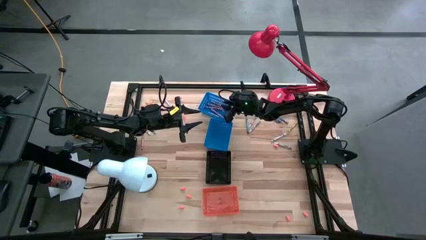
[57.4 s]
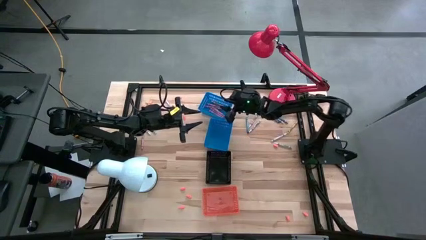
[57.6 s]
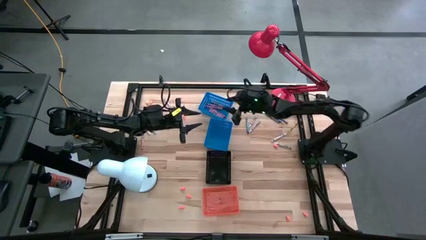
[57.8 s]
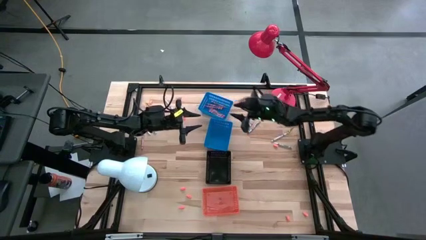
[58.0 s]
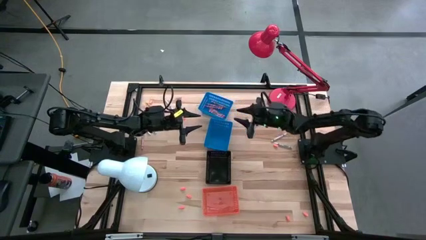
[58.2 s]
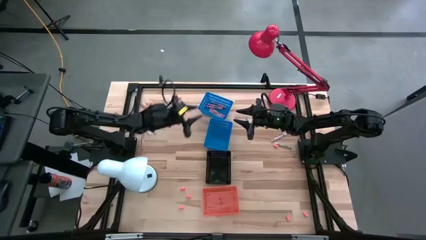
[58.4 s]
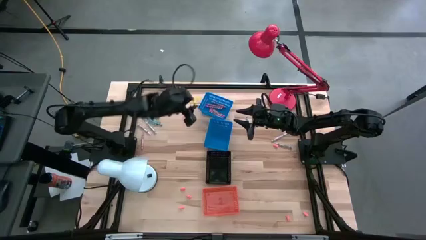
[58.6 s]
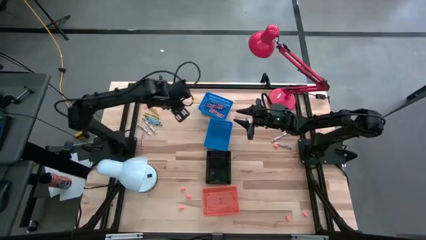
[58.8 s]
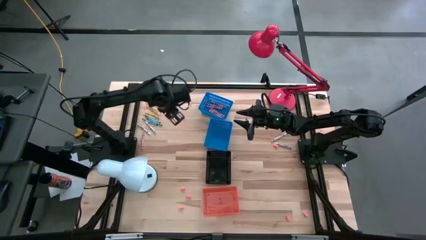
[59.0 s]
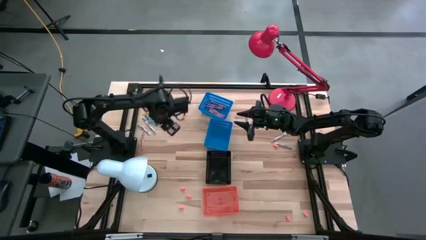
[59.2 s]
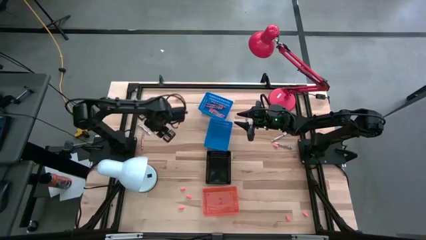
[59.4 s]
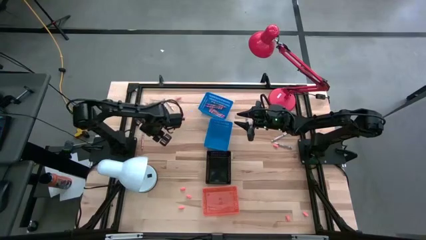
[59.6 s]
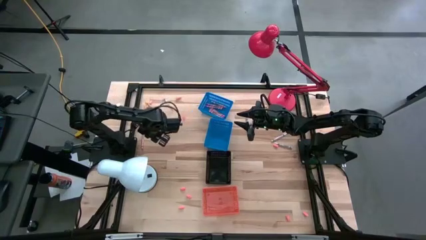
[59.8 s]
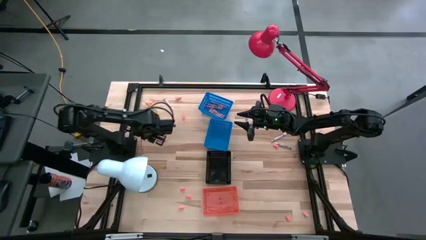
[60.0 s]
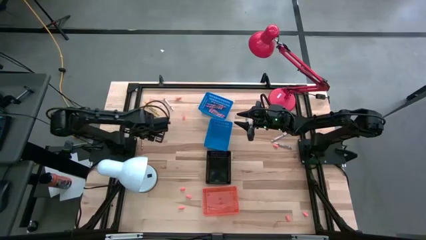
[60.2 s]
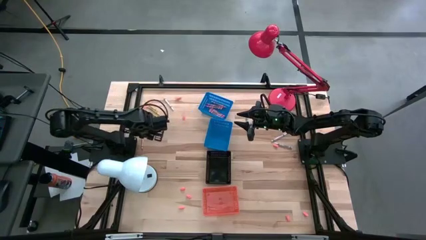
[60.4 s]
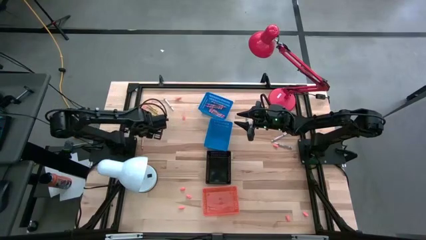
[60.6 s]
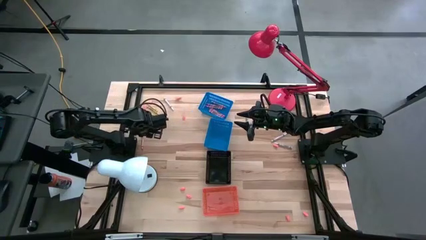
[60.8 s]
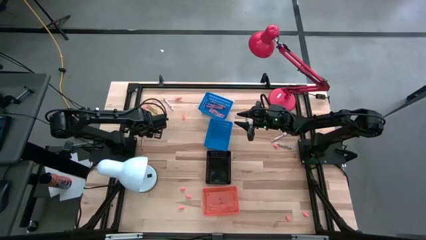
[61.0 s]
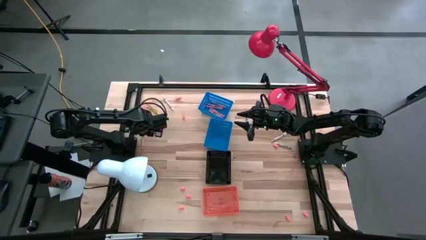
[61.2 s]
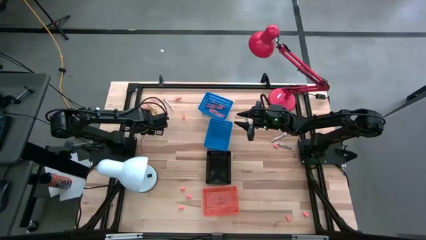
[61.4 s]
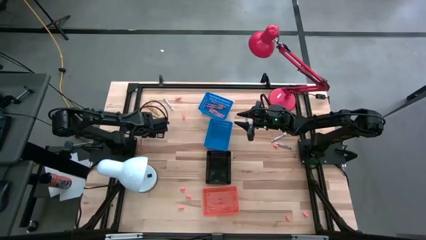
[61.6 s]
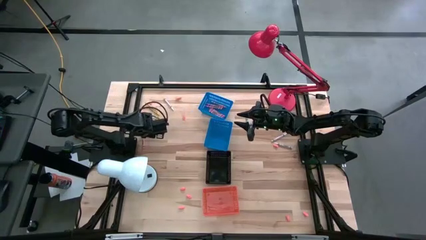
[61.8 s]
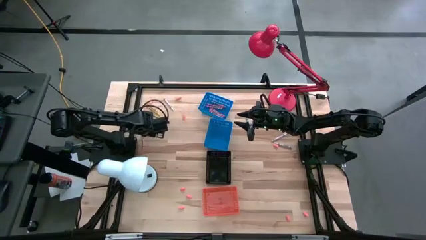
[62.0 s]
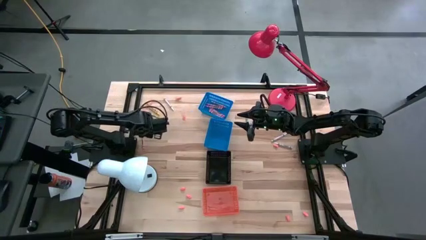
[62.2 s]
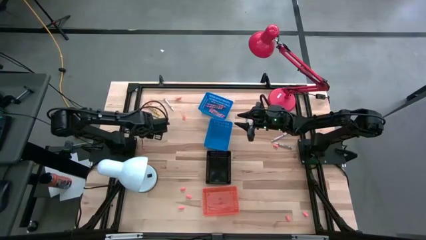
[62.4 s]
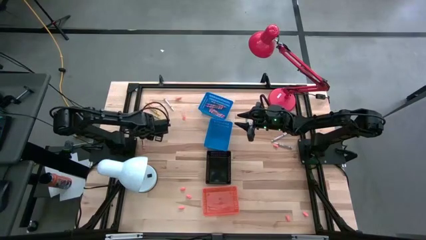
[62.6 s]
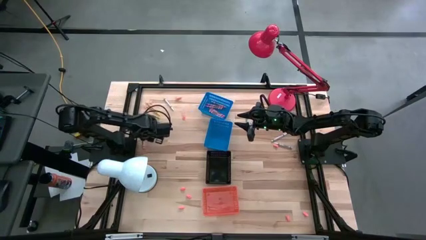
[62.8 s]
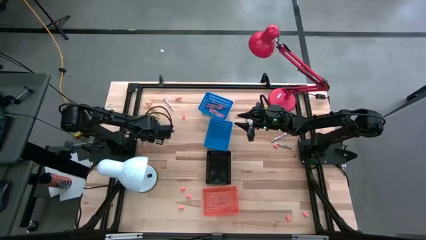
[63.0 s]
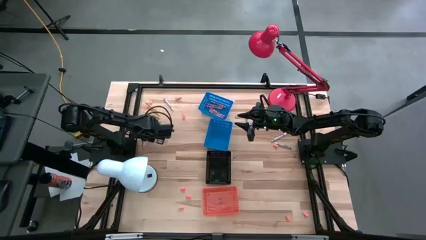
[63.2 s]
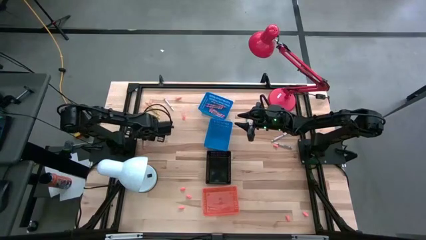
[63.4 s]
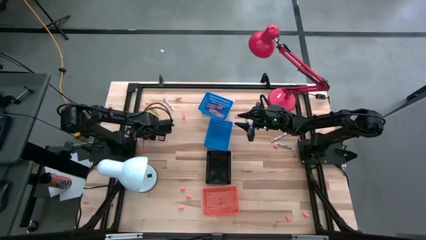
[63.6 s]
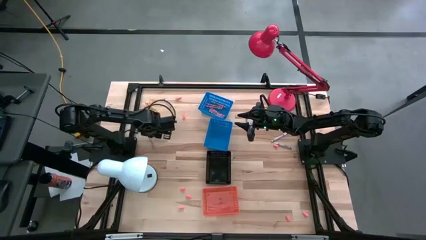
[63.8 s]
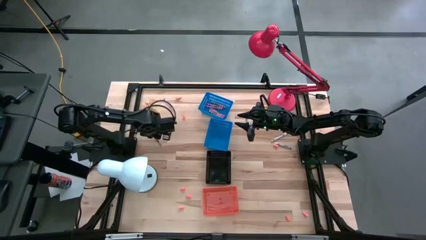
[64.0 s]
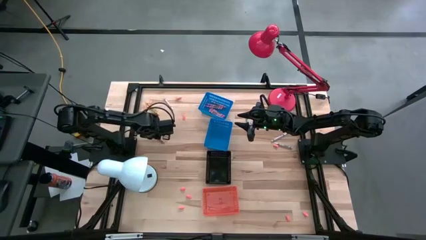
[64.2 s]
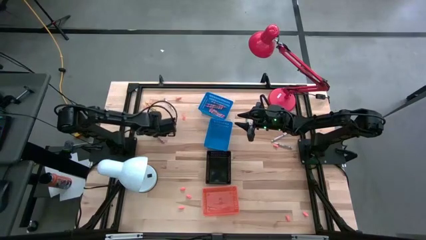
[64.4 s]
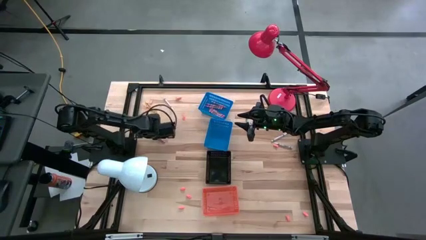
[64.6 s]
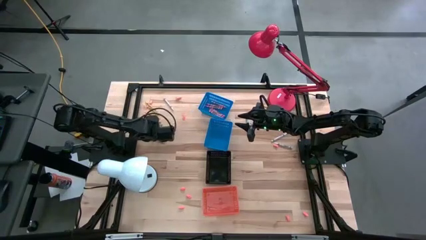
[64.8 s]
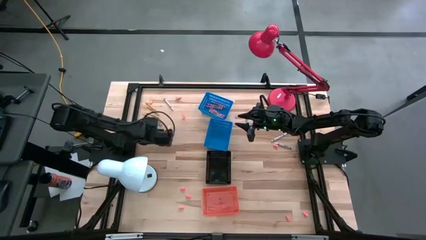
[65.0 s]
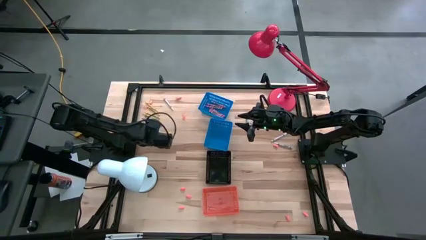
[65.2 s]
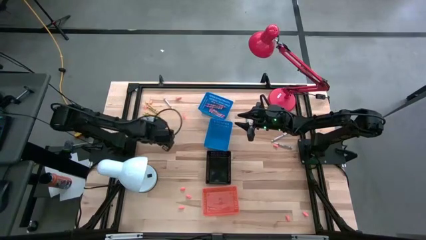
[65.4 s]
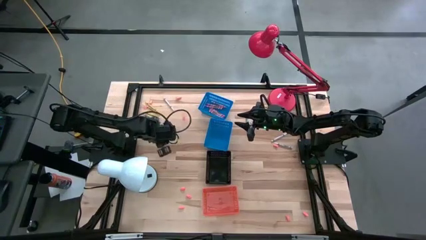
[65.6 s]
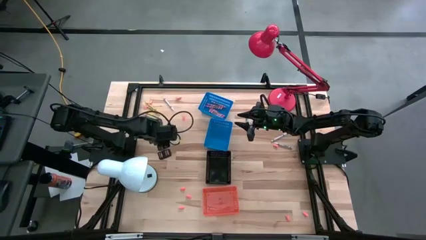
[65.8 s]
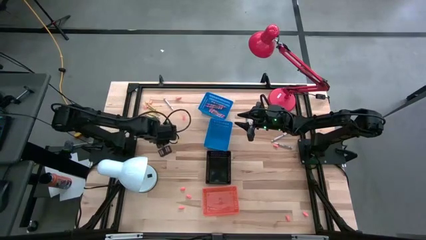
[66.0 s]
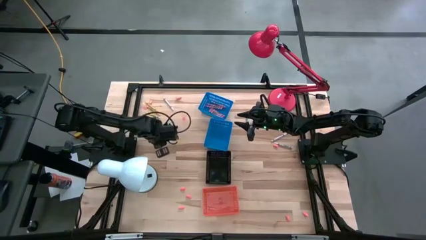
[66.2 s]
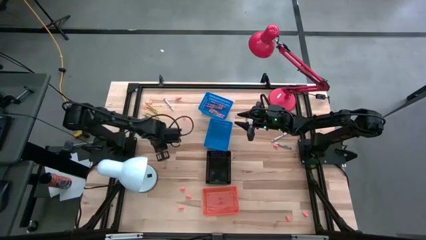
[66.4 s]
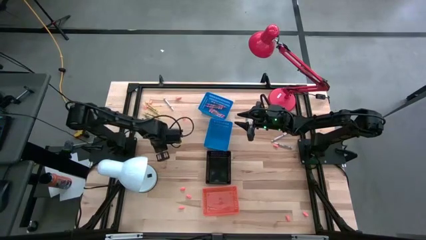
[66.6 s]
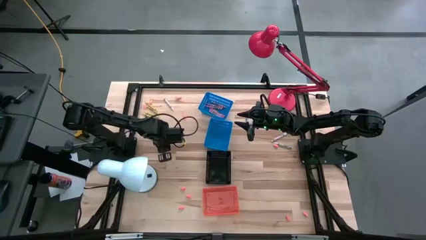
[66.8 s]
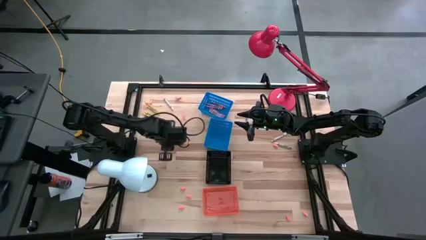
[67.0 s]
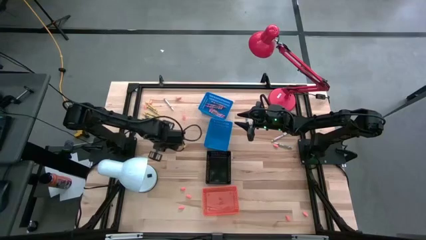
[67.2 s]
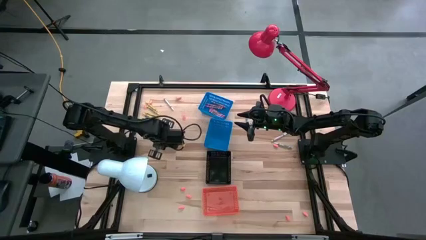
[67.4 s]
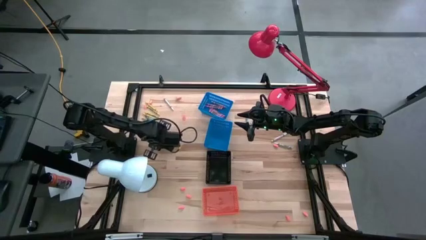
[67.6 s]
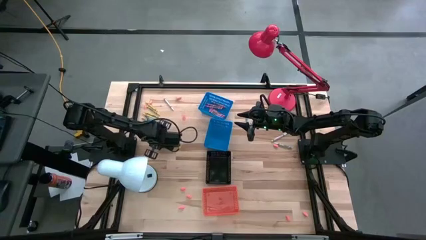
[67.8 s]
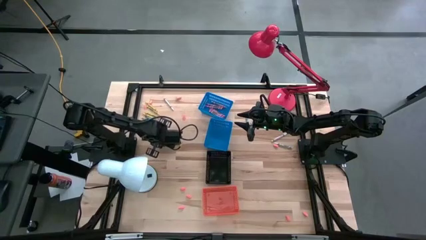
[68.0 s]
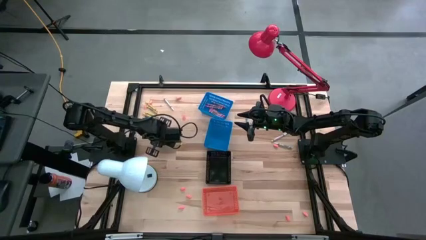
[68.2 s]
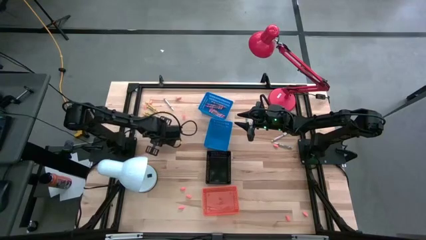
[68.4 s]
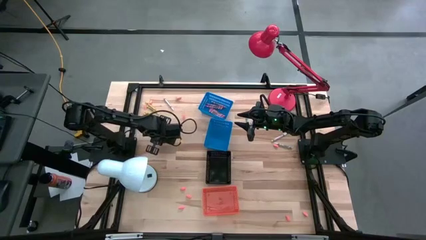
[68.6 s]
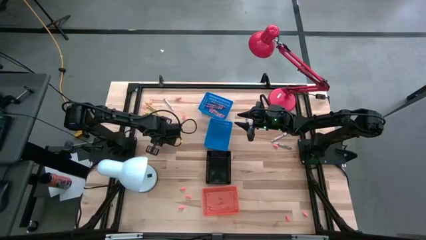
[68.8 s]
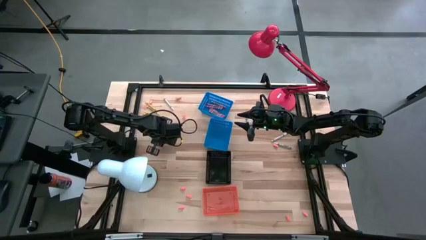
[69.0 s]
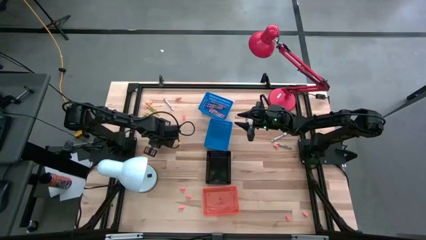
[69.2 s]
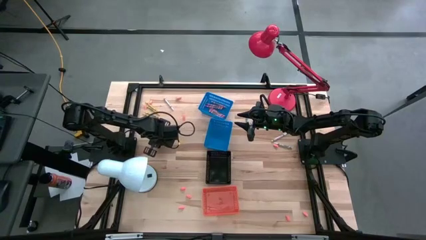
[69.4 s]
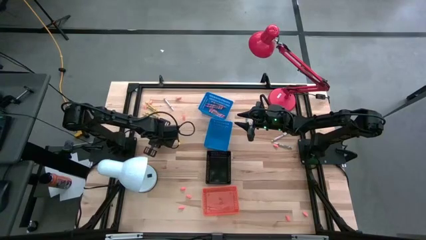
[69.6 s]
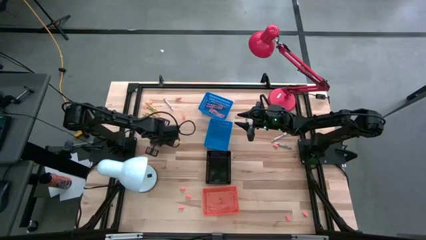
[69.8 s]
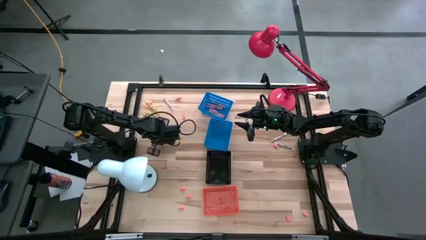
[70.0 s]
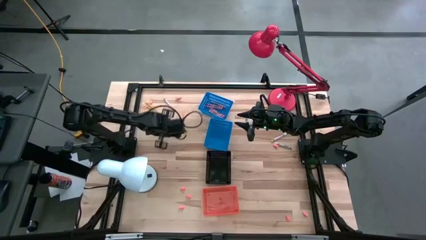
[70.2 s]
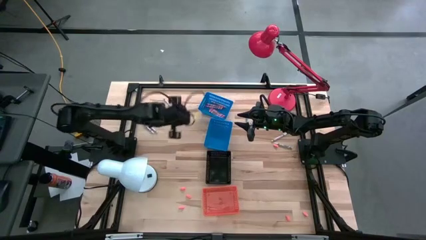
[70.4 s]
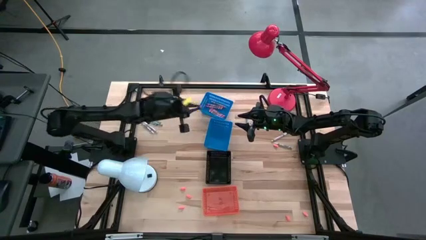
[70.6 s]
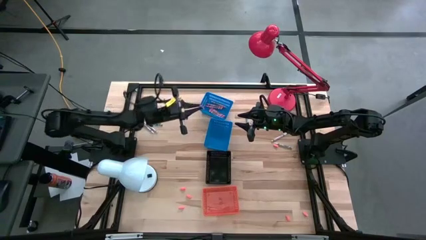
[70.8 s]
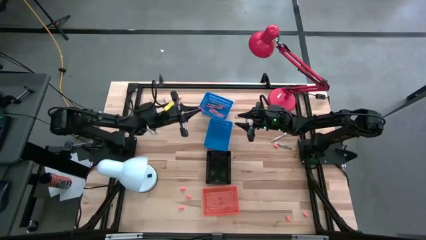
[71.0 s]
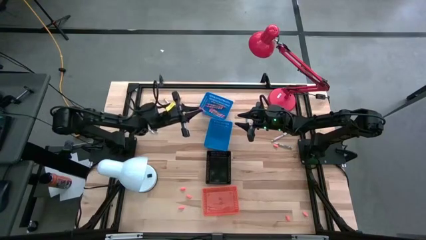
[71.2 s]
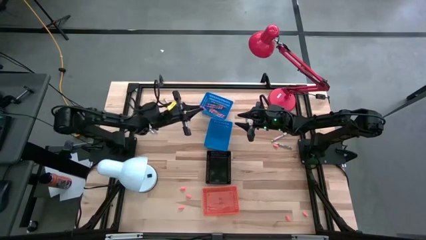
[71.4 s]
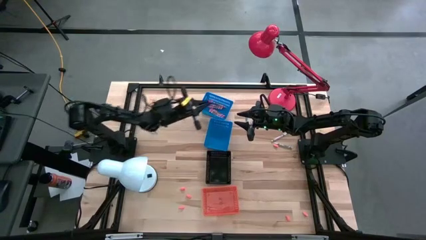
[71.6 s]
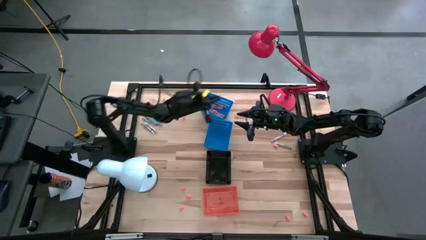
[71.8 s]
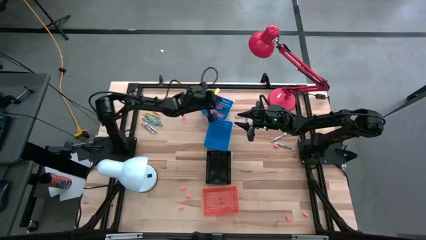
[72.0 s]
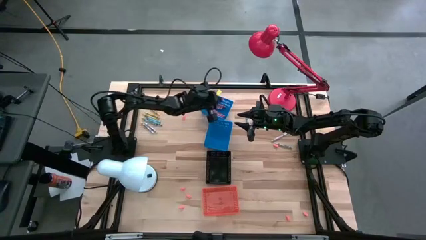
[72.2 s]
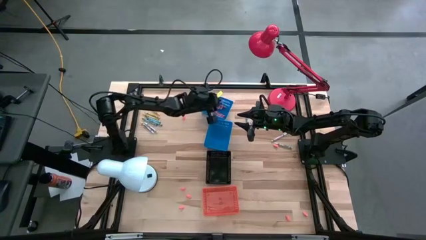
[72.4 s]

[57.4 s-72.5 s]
Task: Sort crayons
Put the pink crayon into the top blue bin
